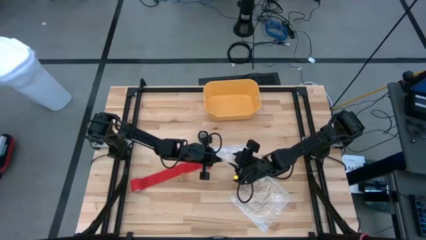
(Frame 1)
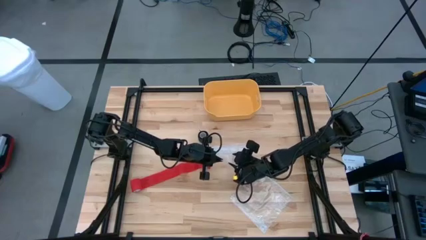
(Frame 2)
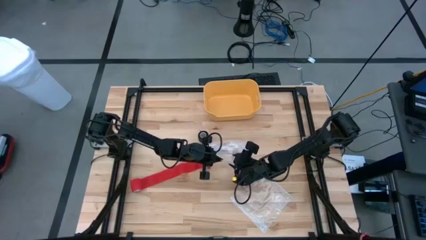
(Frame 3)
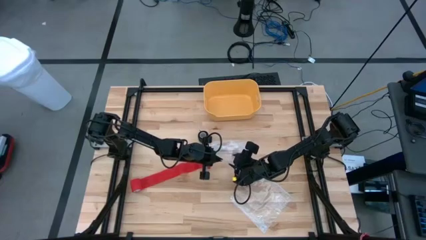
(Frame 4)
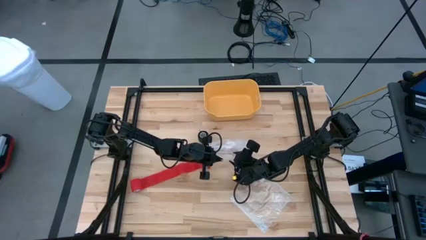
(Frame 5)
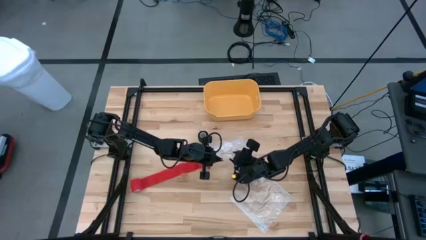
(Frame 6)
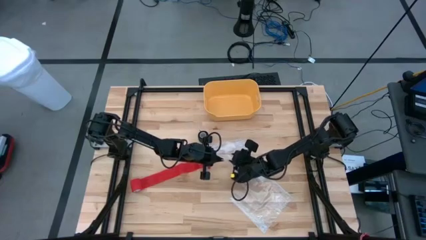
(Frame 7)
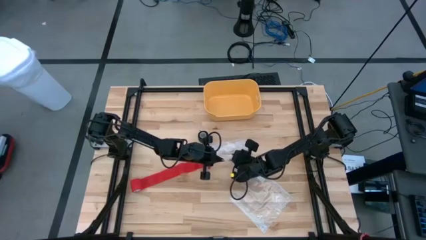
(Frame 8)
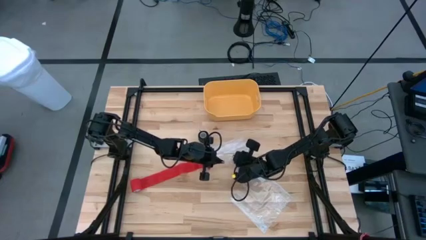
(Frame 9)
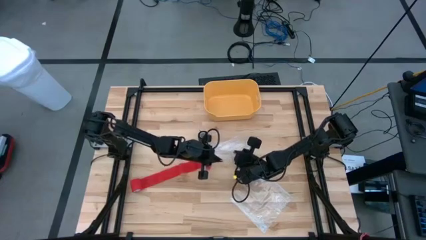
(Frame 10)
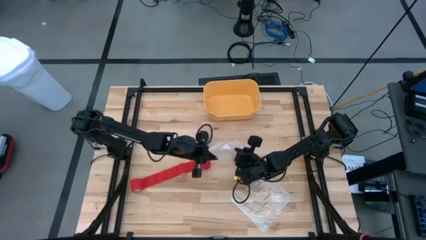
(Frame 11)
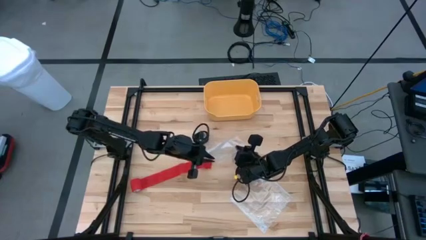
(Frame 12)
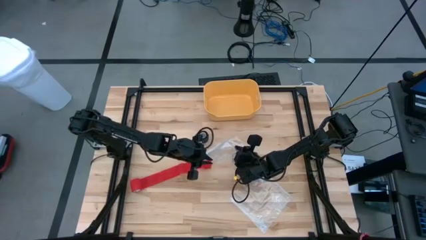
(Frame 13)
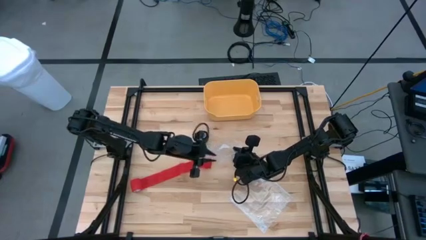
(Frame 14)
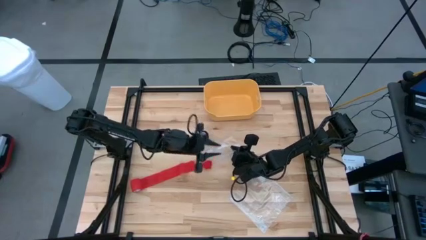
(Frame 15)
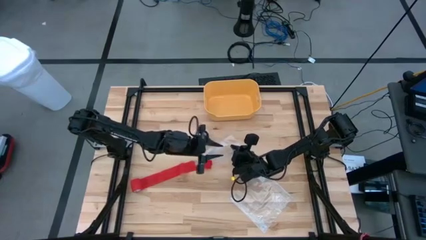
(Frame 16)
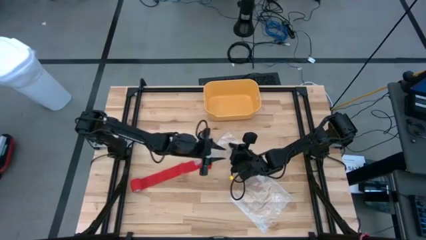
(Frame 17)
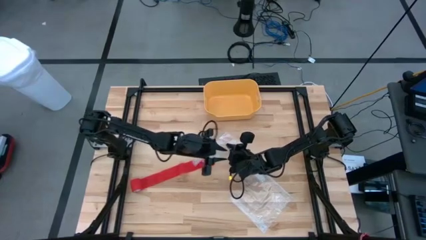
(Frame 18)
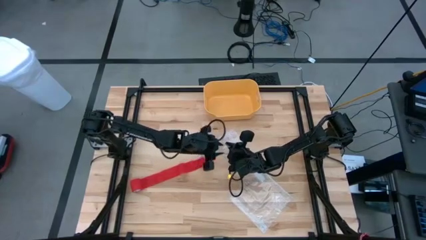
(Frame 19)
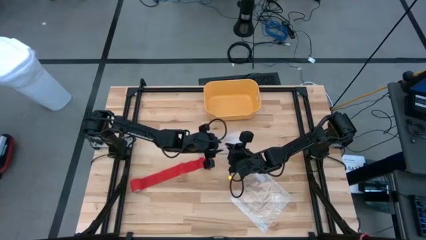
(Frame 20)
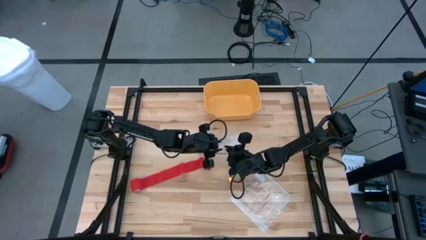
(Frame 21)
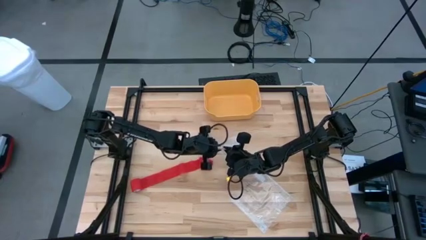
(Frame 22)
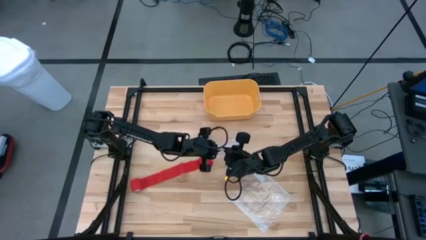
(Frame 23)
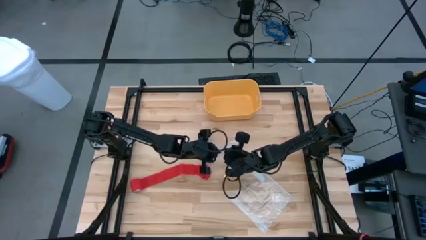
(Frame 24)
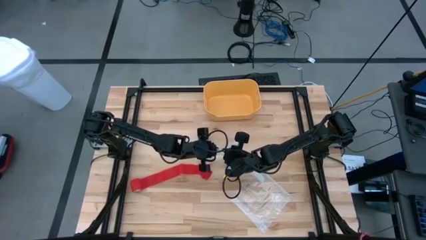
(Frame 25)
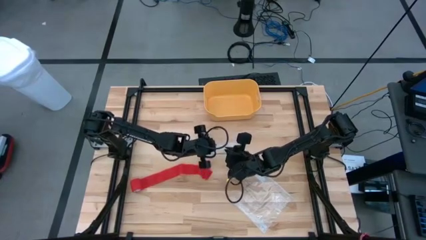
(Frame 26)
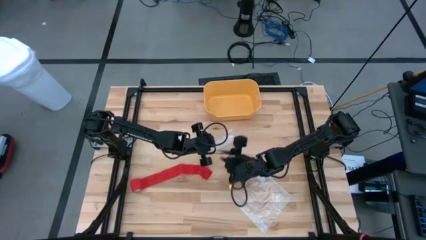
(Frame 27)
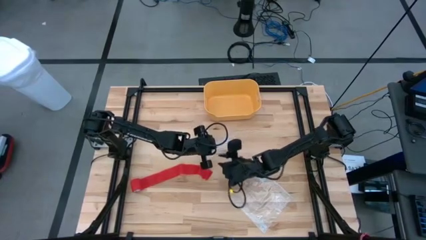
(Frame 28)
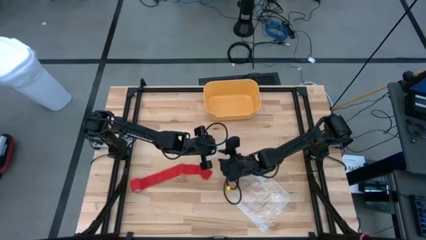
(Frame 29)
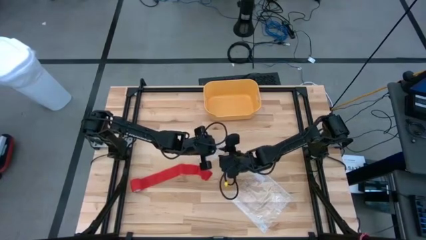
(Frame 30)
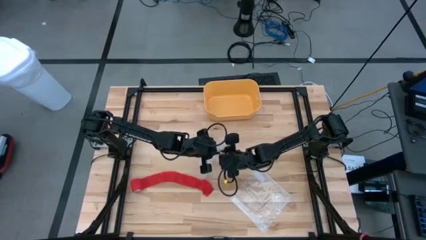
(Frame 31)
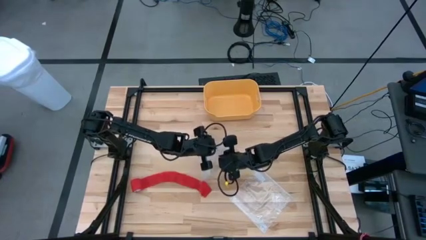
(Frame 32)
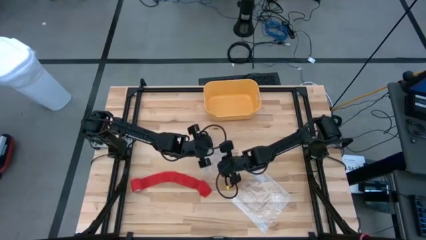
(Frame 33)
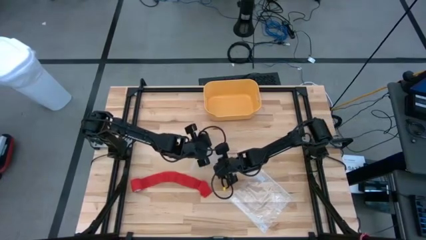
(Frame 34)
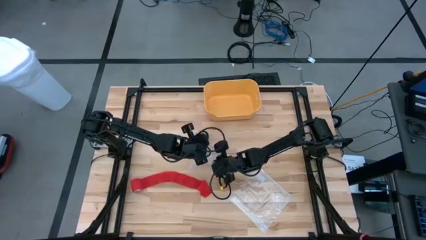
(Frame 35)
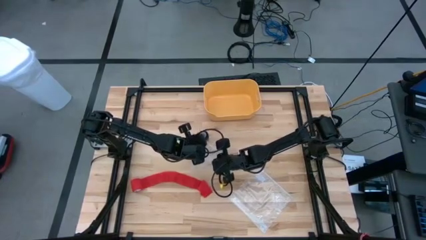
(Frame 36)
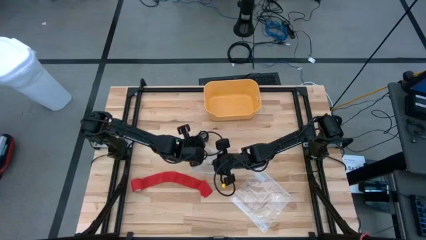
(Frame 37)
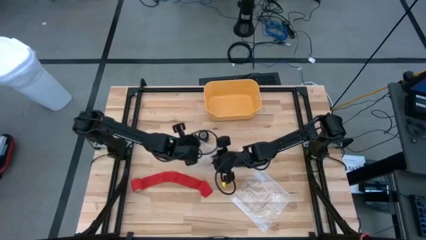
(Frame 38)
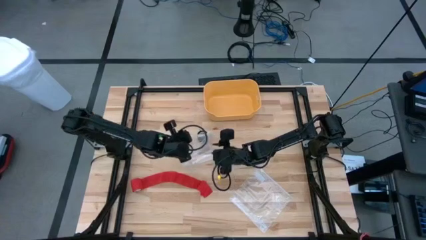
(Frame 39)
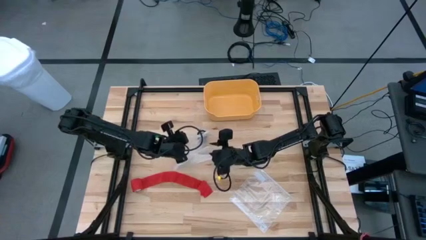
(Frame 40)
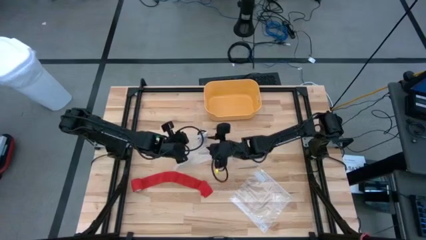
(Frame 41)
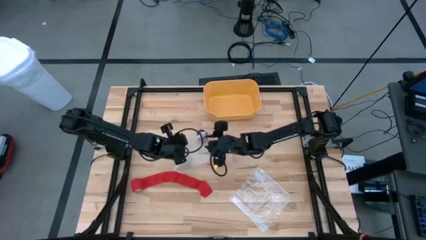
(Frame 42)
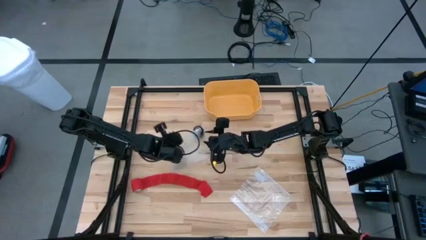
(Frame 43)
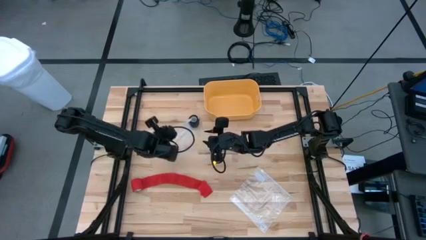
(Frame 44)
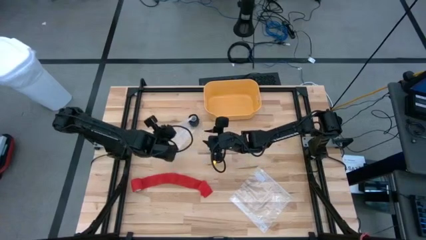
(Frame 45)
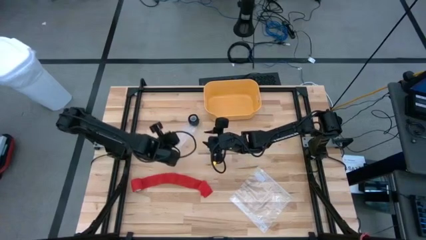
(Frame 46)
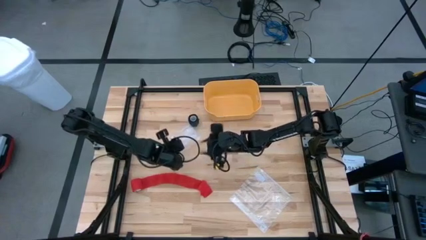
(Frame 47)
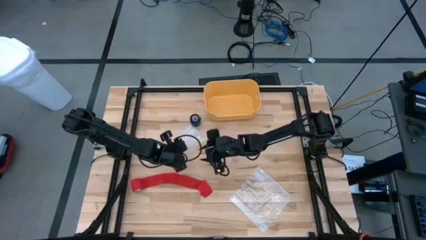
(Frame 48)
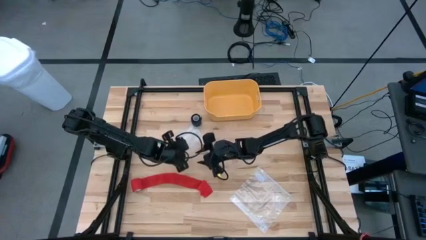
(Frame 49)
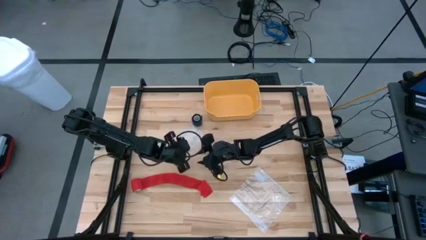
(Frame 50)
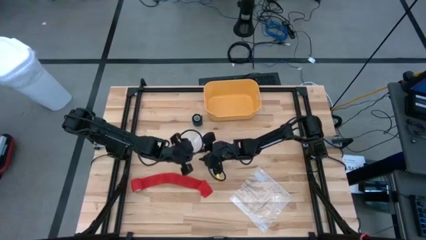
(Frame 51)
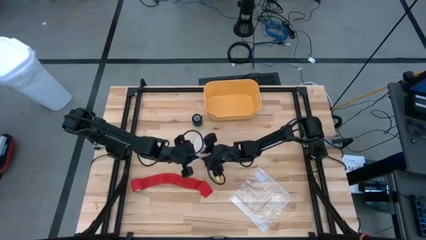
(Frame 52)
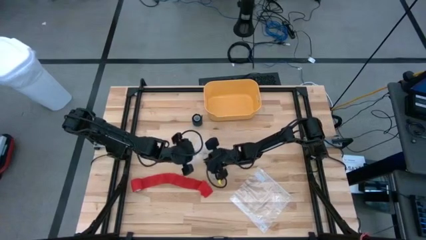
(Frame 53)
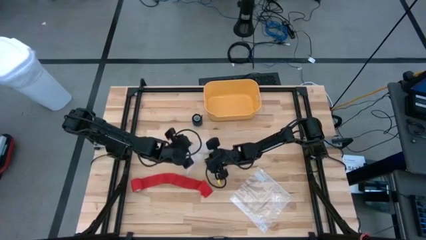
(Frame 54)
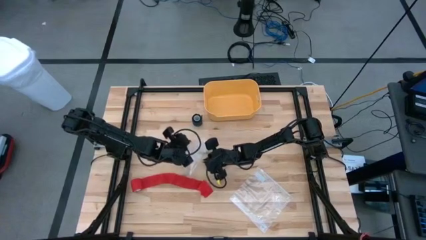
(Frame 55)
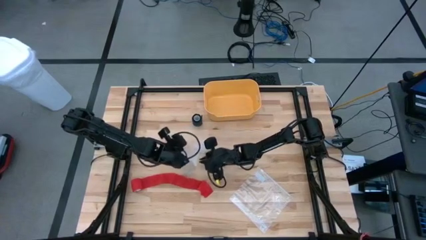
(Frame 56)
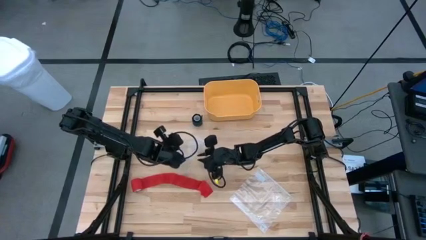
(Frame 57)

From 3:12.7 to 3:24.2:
Task: Roll bandage
Open the transparent zip bag

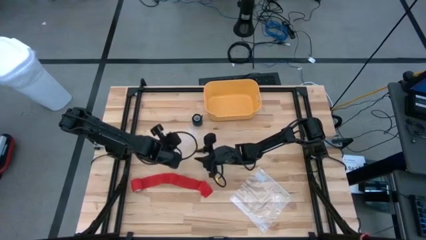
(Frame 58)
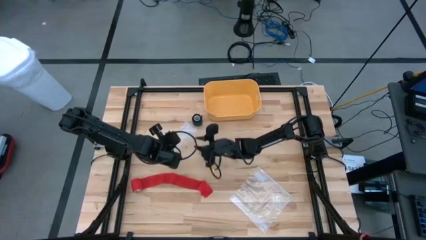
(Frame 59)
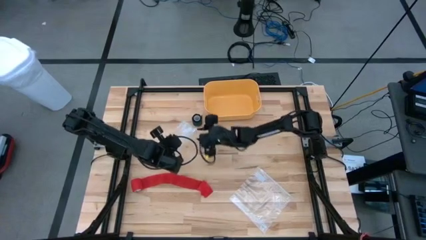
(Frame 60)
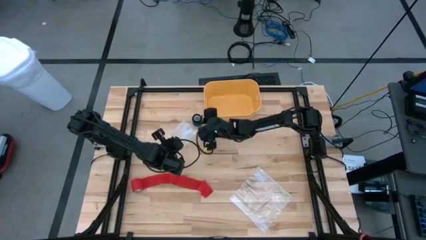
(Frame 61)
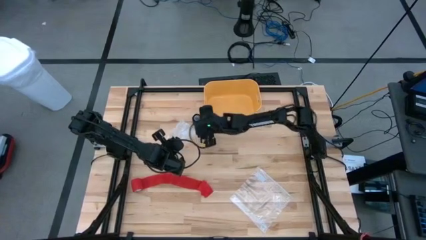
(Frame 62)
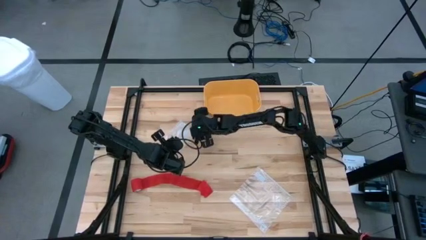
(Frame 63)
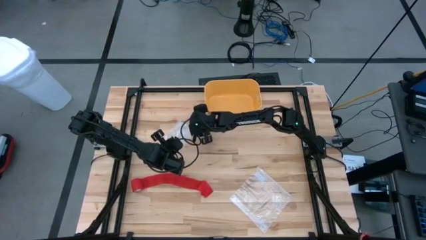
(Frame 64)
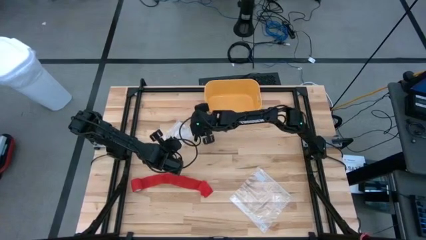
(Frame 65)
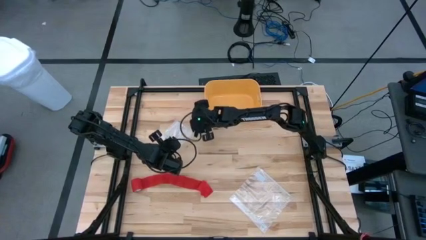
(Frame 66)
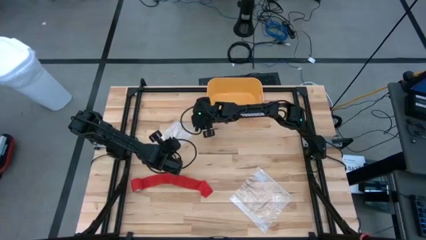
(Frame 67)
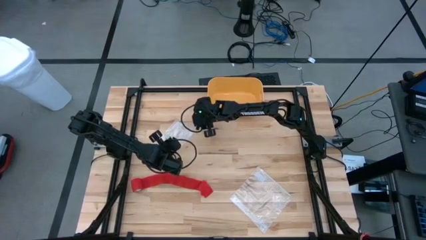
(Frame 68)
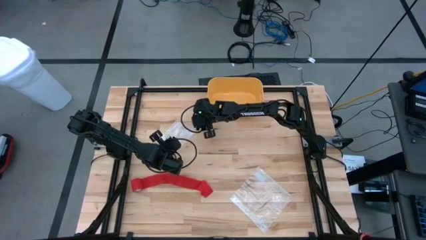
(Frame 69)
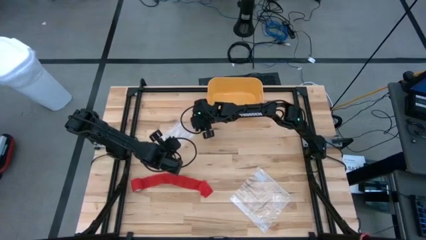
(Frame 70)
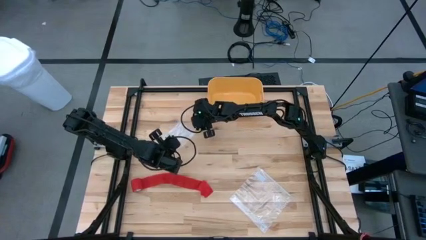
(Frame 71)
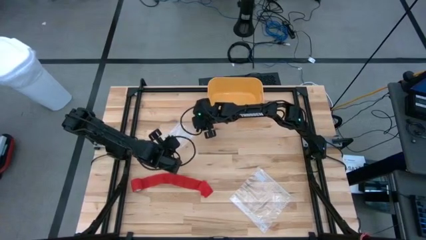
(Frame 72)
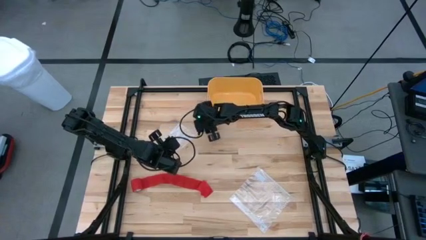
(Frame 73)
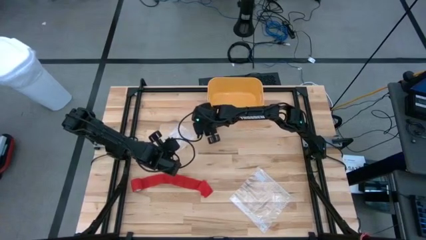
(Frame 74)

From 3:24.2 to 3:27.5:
Put the rolled green bandage into the transparent zip bag

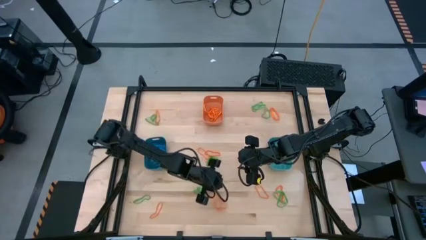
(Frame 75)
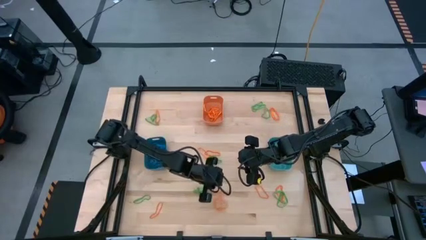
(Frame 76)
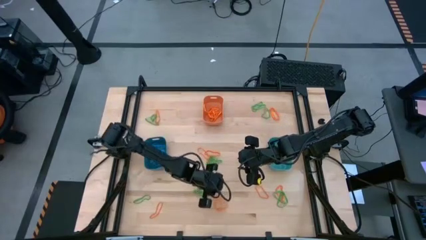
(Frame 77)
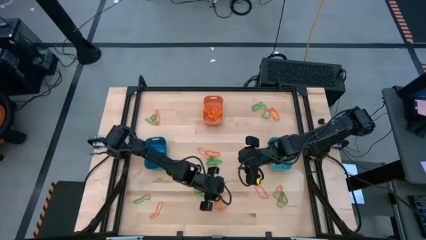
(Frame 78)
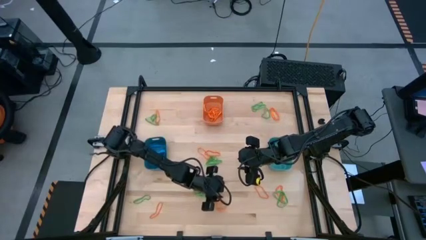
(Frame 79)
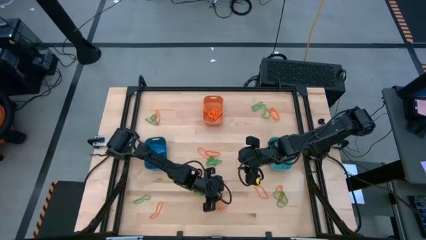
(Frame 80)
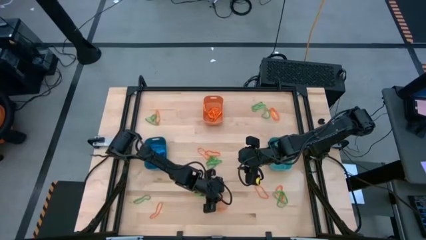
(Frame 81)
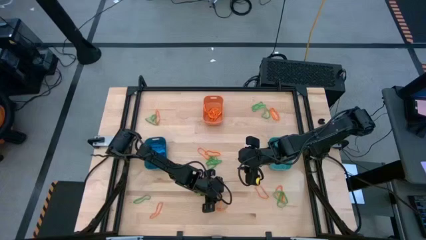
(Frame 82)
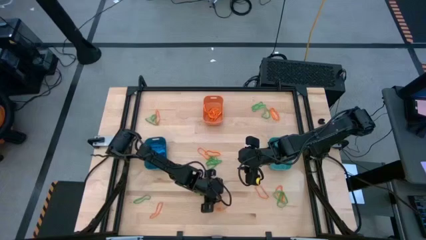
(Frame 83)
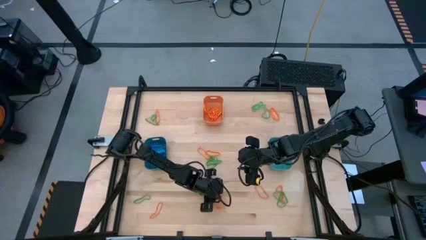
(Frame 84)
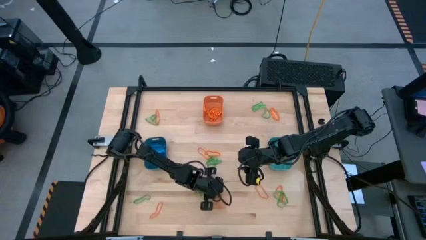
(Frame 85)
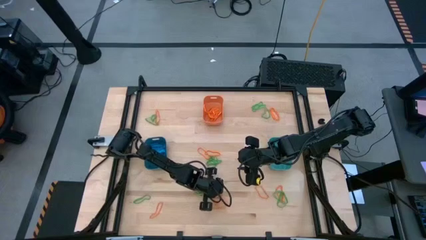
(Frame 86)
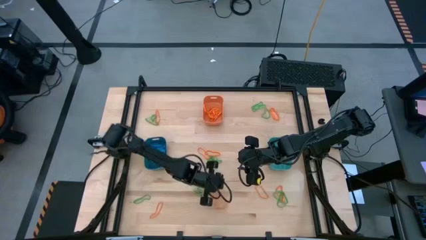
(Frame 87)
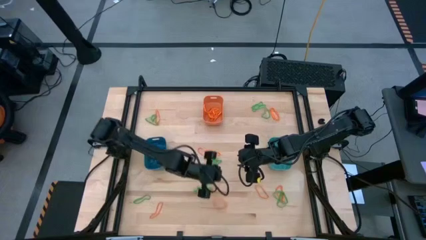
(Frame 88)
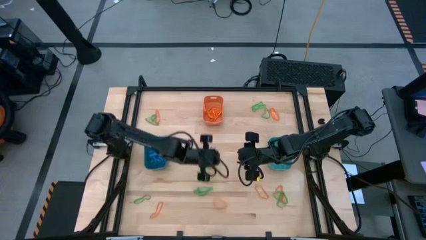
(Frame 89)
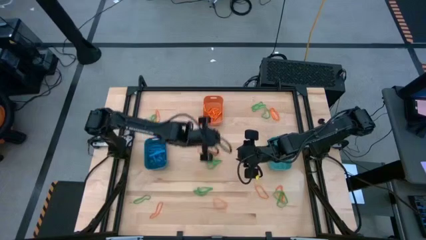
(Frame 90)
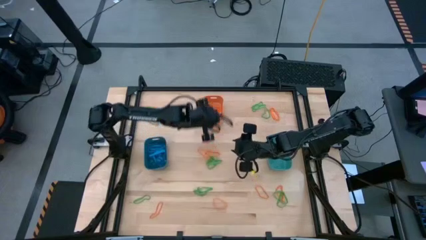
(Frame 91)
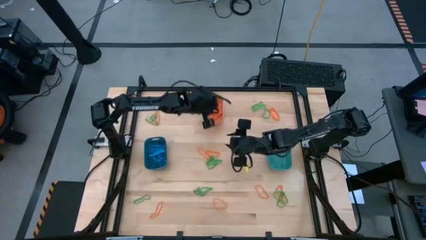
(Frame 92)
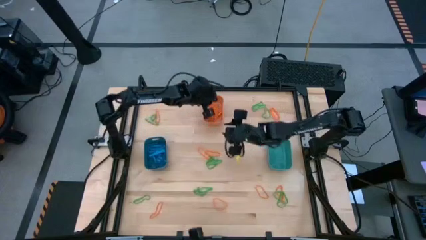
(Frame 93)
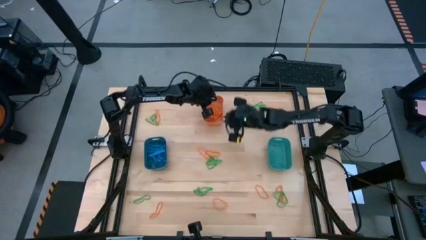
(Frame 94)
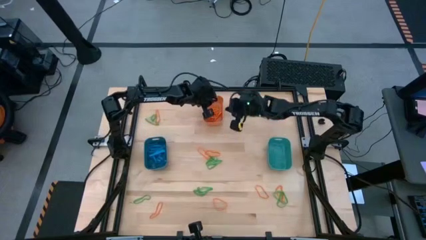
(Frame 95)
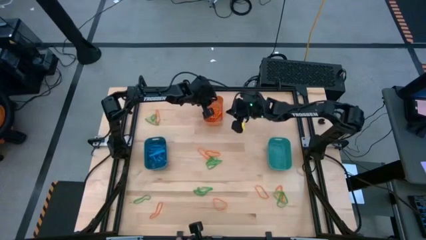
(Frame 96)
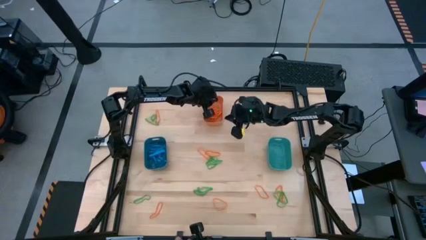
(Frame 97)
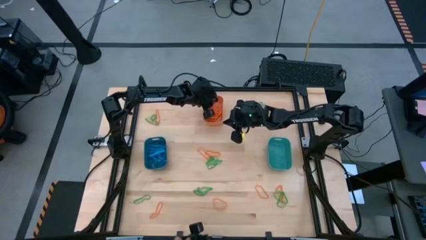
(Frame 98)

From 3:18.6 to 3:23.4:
Task: Sort rubber bands into baskets
Put the orange rubber band into the orange bin
